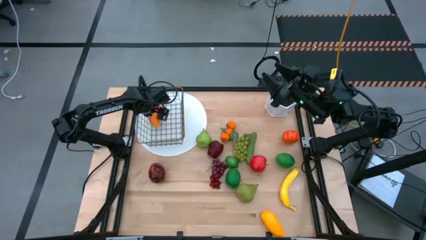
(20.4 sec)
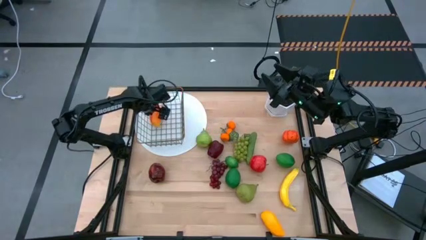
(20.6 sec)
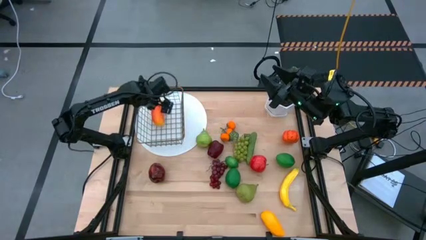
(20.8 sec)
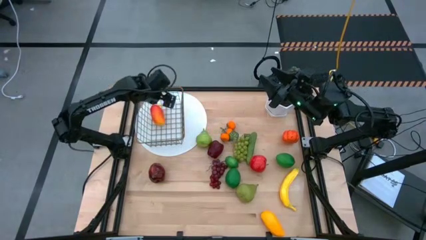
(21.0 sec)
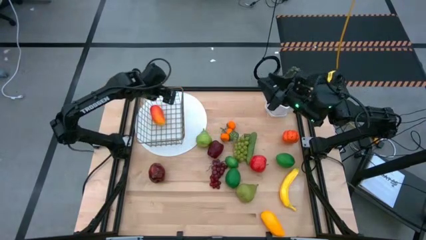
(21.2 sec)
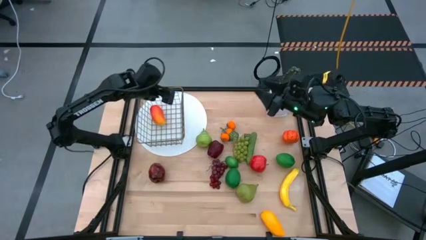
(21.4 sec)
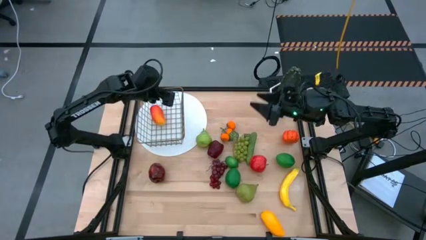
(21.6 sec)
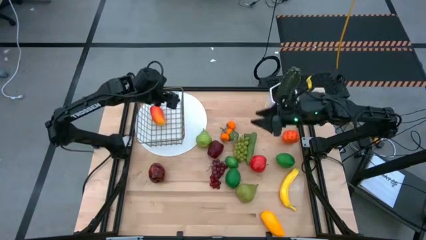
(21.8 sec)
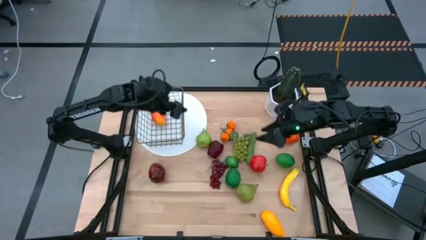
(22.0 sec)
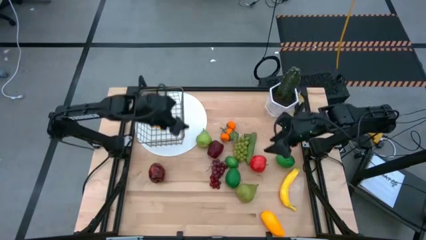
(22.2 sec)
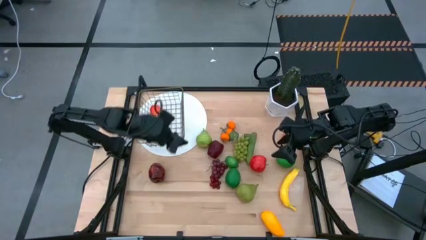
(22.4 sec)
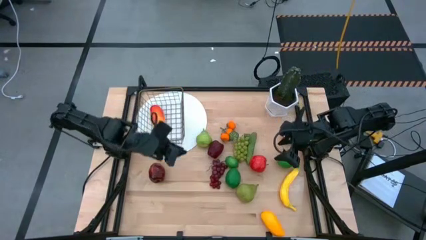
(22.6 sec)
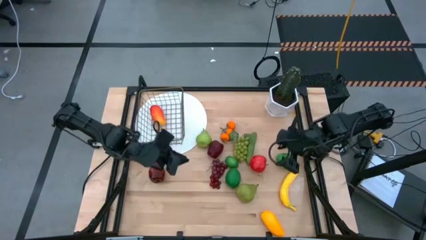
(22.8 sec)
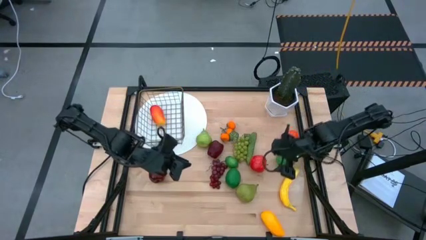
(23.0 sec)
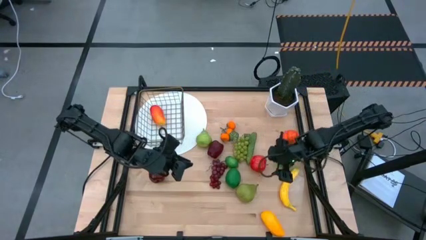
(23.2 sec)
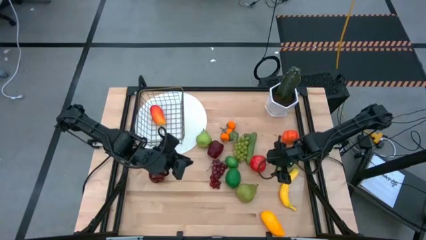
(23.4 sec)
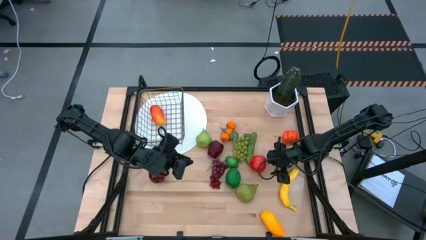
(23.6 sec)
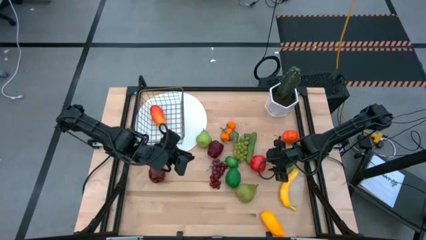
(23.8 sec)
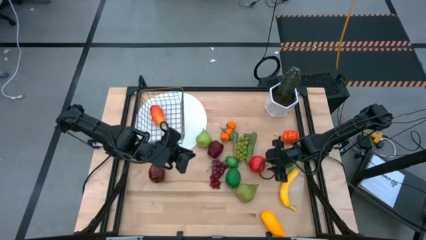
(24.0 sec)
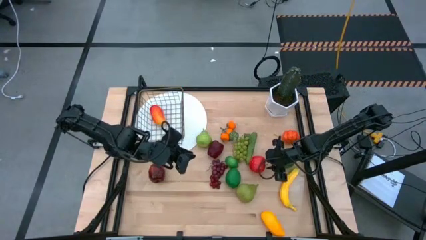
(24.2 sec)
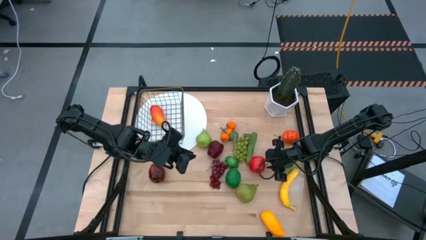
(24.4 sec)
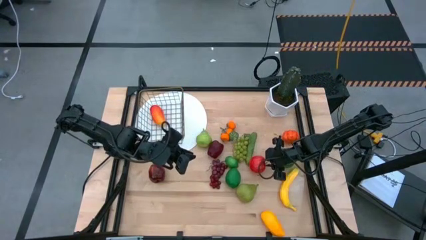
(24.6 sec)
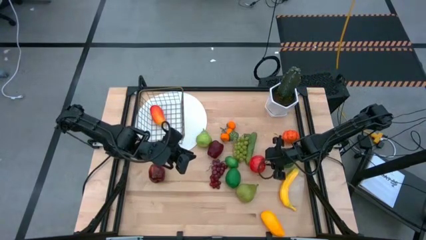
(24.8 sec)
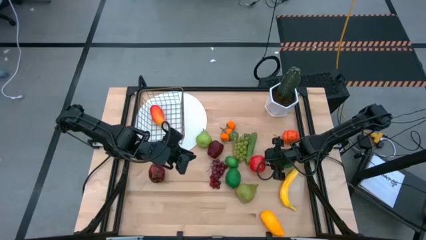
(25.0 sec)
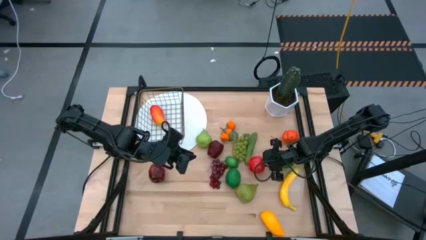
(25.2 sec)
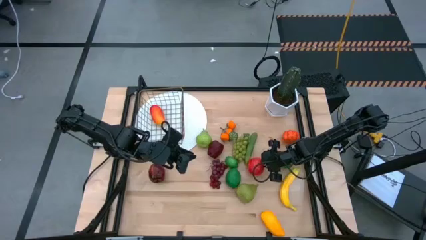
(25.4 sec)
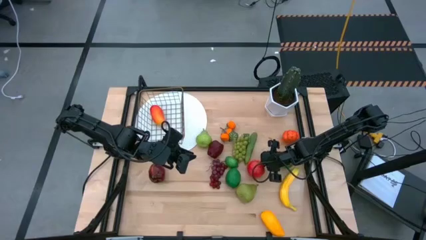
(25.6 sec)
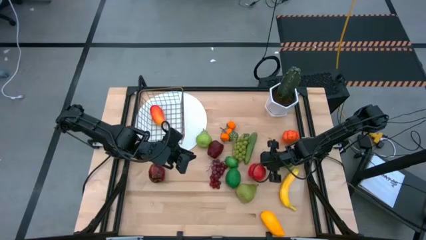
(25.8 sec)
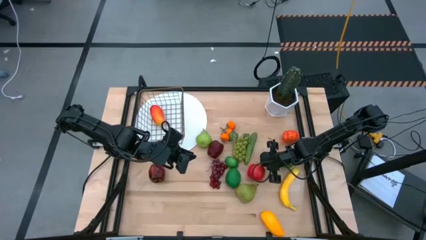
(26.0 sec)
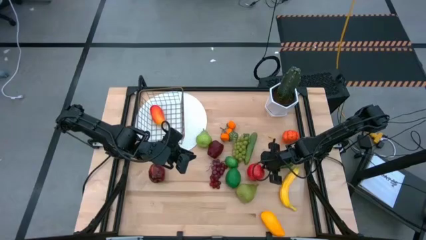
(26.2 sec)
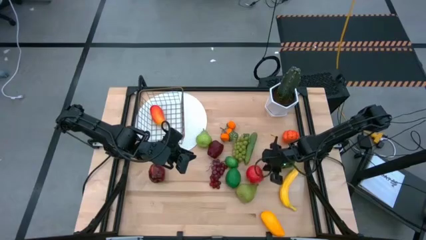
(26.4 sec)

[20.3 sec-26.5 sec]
Task: Build produce basket
Put the red apple into the wire basket

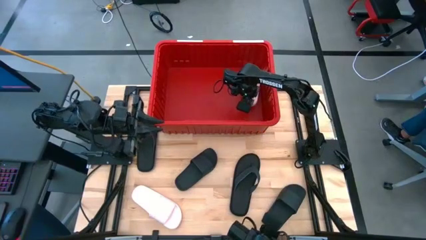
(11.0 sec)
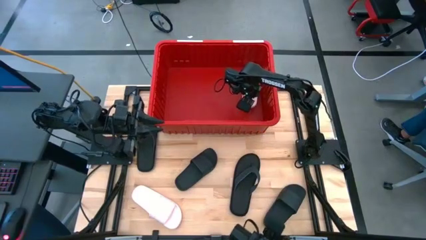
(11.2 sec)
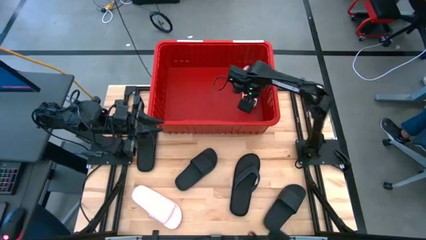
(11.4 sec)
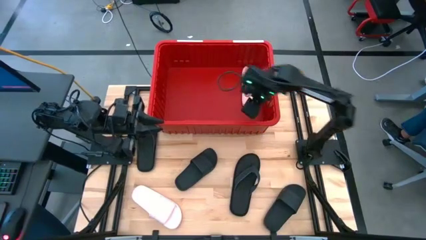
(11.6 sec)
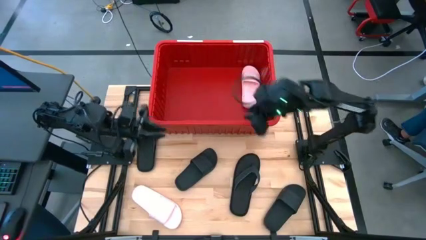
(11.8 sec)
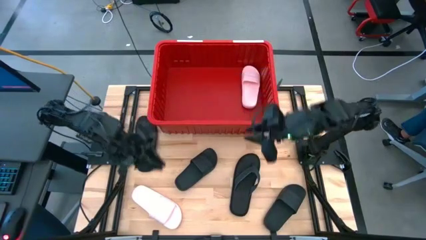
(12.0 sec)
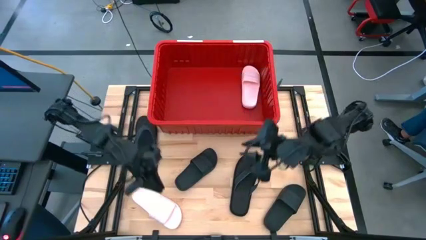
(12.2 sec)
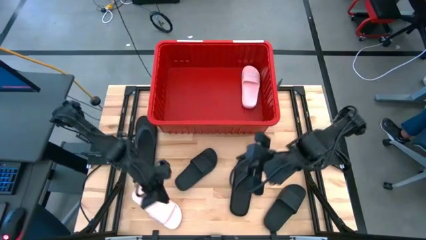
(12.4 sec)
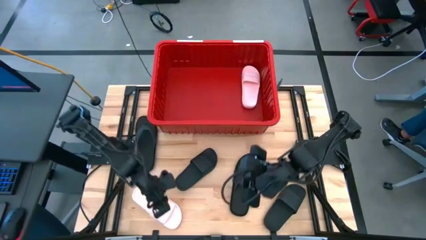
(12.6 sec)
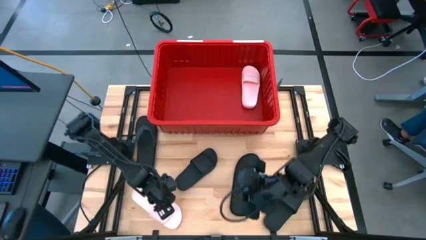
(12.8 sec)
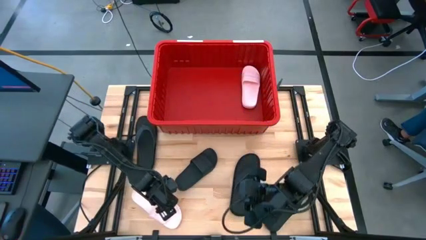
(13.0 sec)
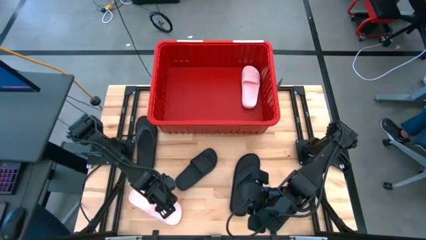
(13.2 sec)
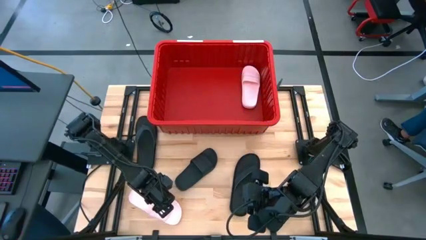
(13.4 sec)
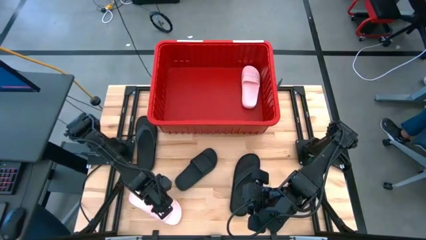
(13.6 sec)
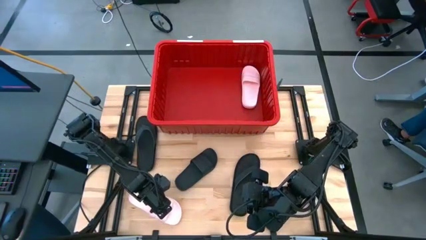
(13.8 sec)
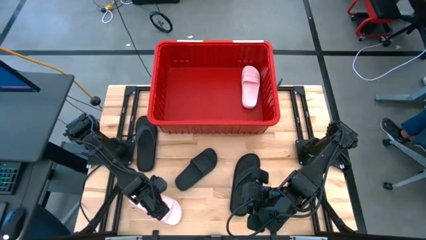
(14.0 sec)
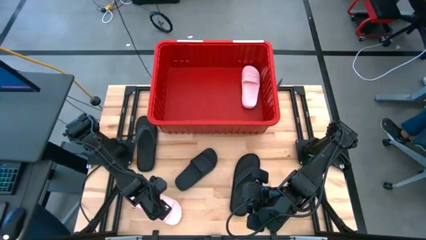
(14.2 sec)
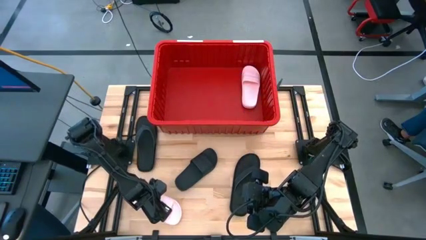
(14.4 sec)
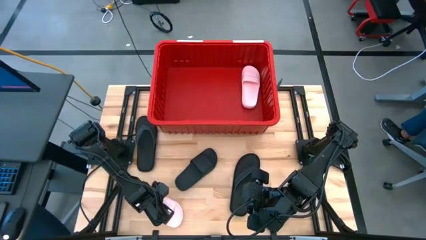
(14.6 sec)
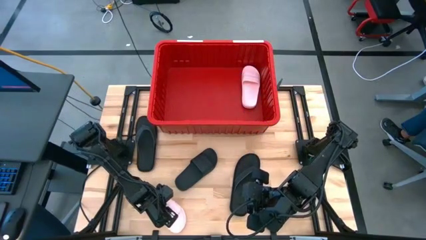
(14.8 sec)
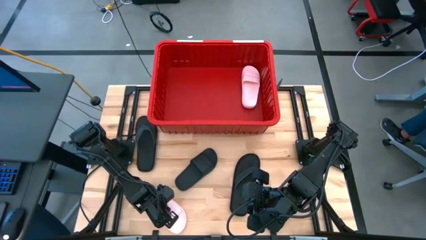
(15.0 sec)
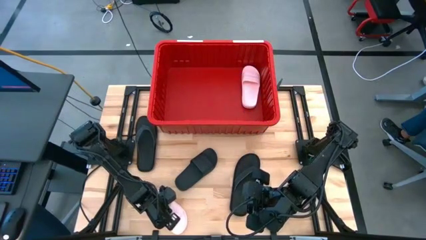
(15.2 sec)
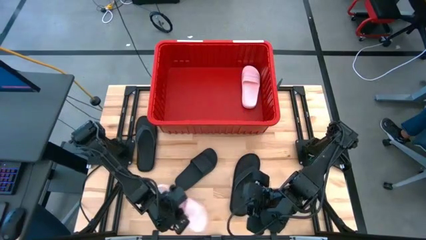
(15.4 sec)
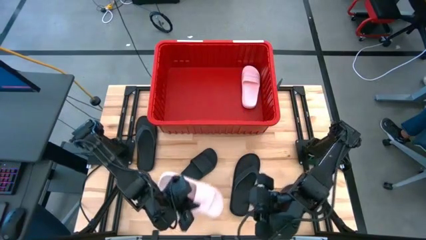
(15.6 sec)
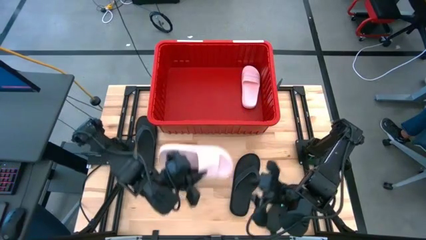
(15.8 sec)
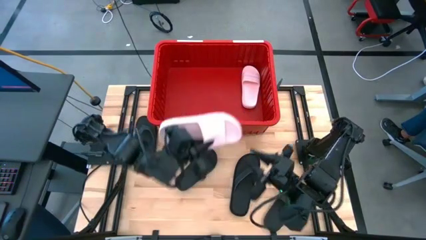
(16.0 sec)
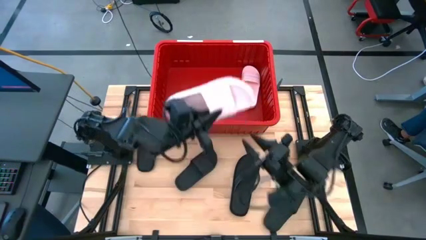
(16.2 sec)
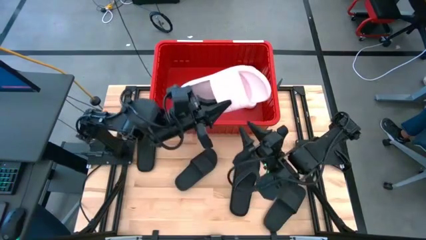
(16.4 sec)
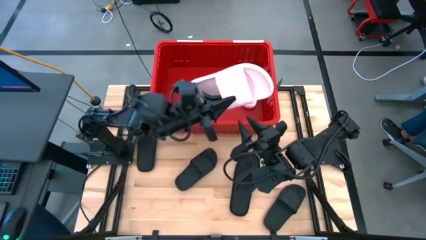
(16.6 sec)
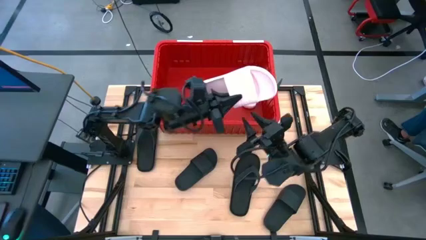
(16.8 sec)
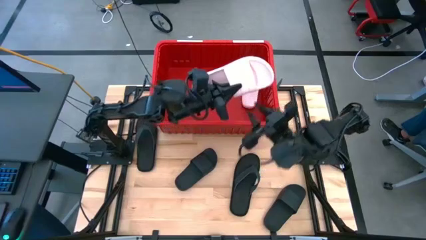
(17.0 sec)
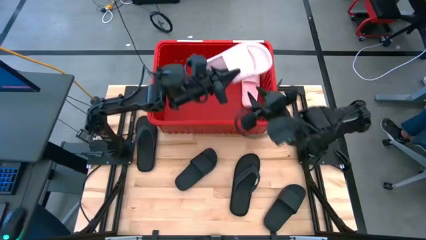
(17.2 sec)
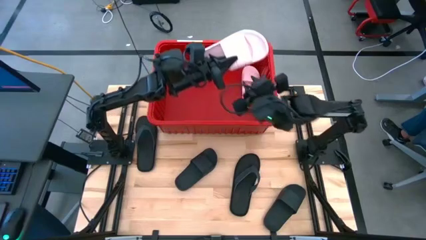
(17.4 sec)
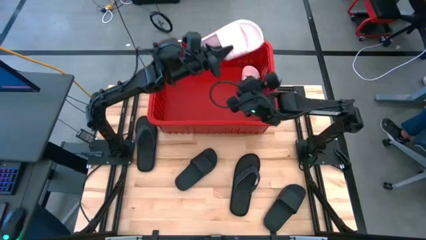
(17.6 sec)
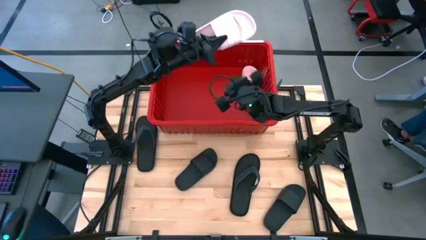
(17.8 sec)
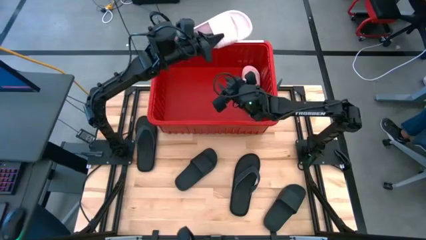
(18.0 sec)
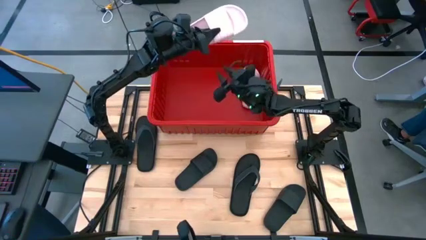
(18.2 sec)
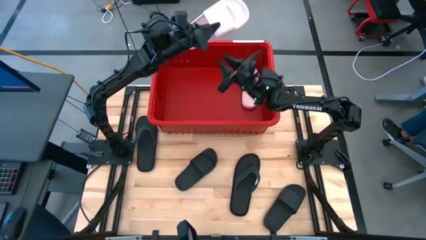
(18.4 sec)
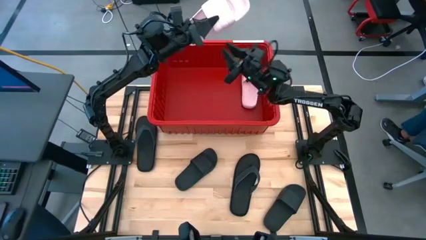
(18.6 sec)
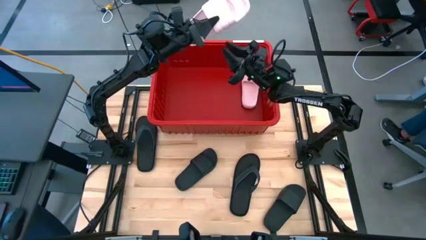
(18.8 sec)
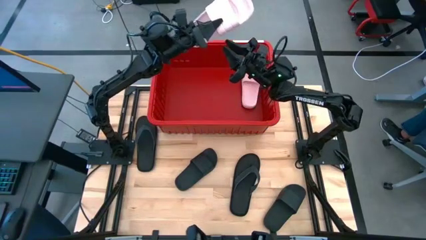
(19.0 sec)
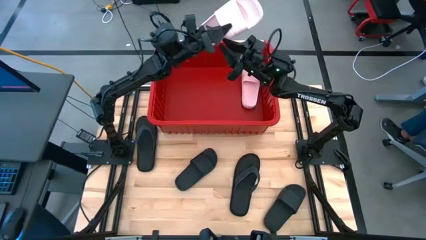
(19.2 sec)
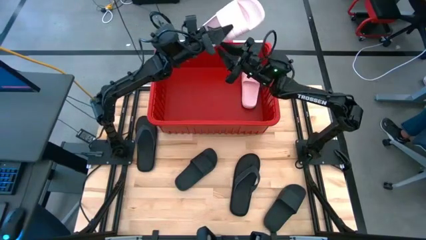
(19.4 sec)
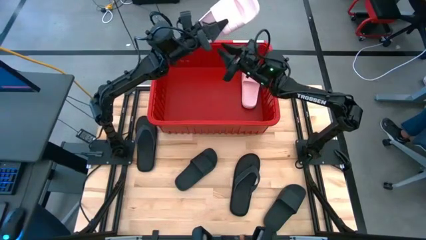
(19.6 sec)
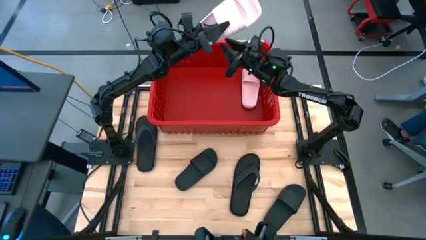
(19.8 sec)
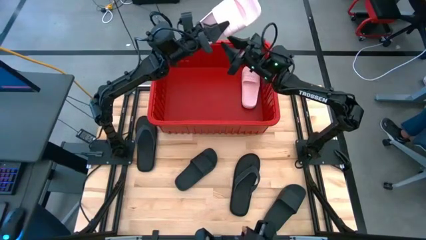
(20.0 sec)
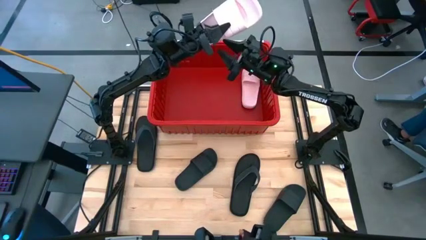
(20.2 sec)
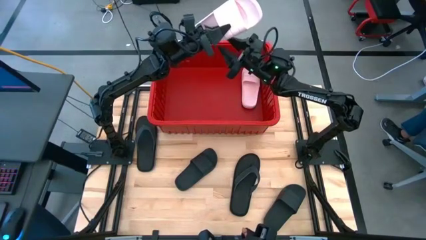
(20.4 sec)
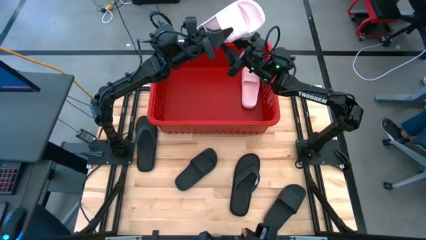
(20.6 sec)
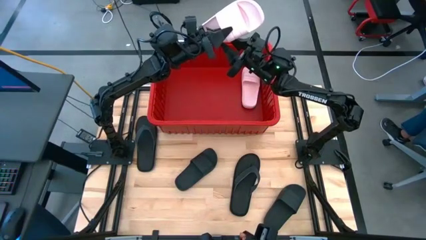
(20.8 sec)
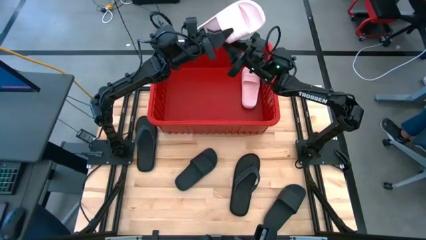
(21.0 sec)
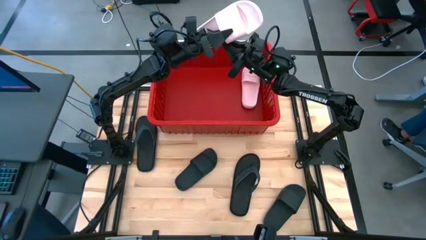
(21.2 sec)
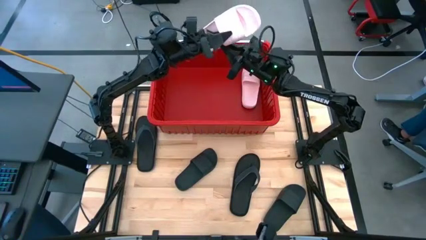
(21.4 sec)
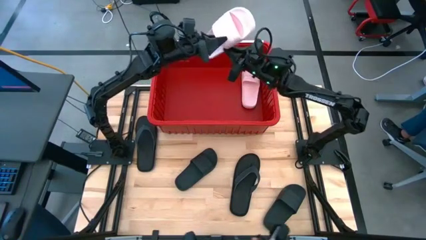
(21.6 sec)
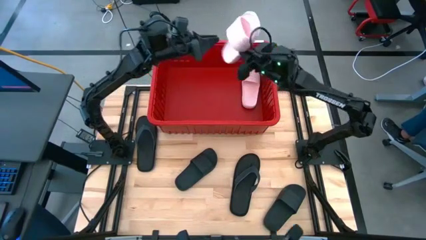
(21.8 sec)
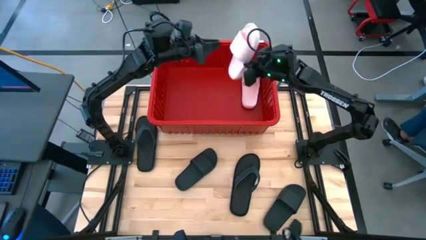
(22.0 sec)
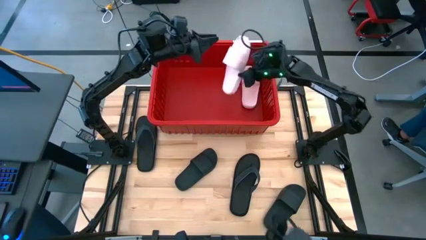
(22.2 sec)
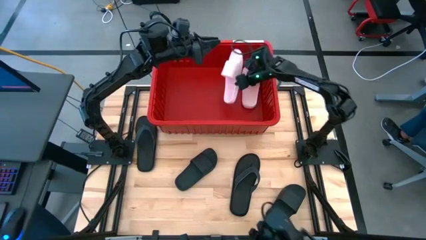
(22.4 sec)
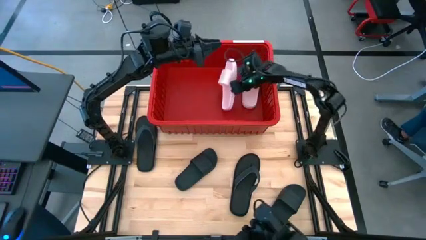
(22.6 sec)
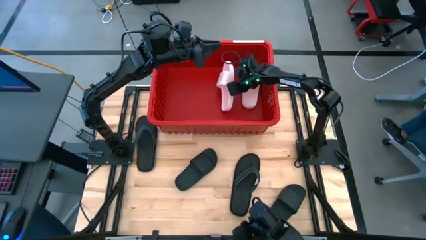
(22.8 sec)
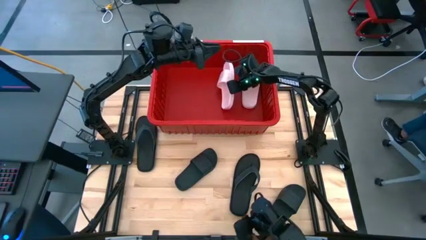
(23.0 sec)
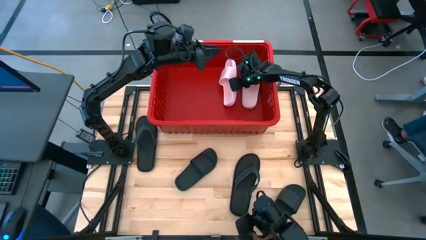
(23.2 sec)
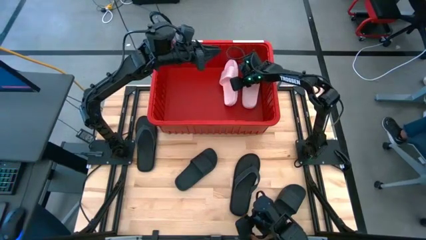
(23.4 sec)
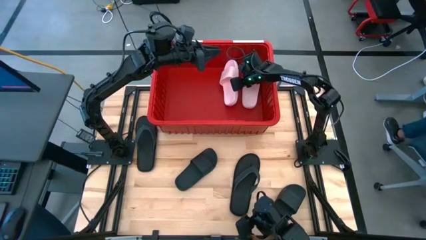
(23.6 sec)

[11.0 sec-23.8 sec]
Task: Pick and place slides into bin
Put the pink slide into the red bin
